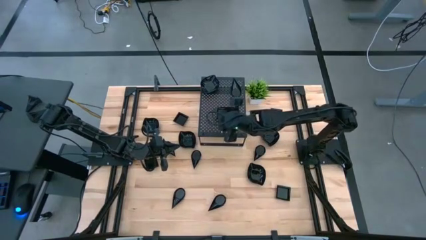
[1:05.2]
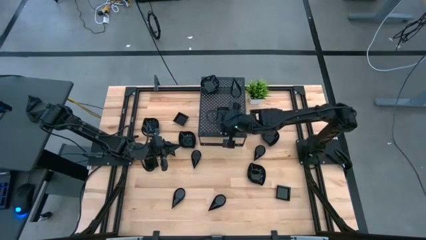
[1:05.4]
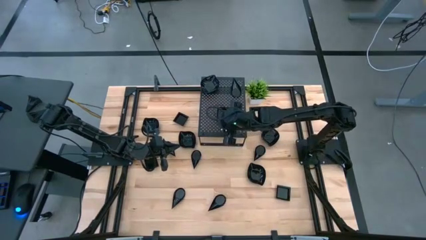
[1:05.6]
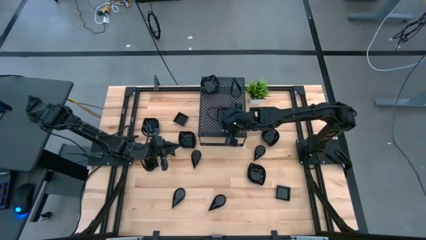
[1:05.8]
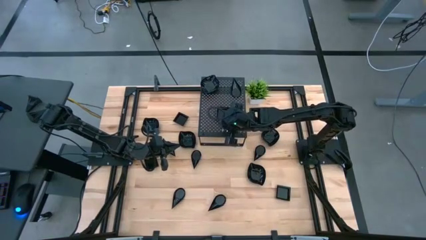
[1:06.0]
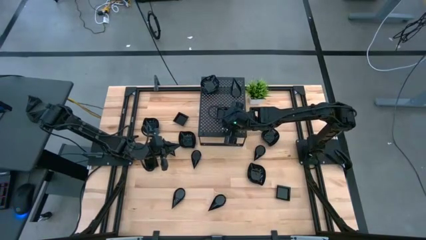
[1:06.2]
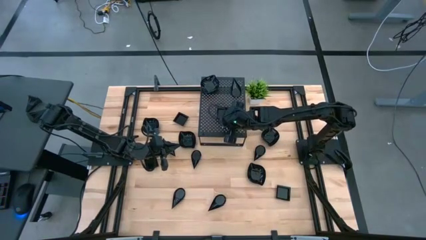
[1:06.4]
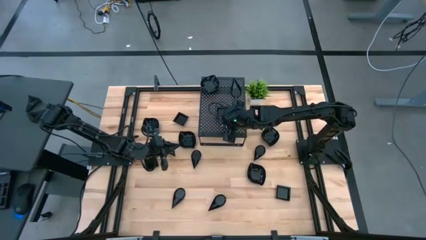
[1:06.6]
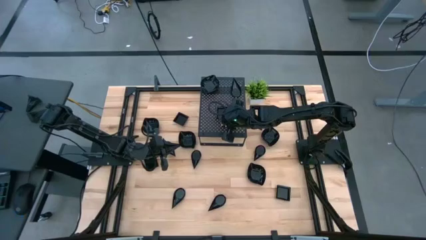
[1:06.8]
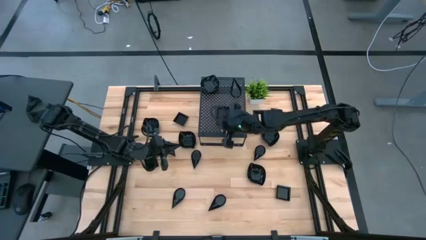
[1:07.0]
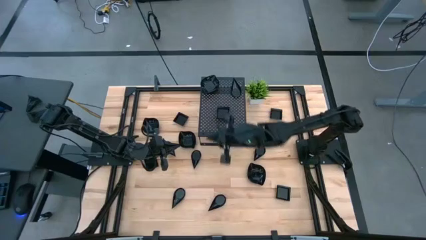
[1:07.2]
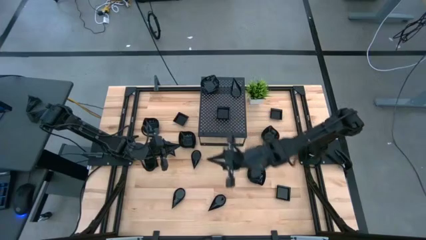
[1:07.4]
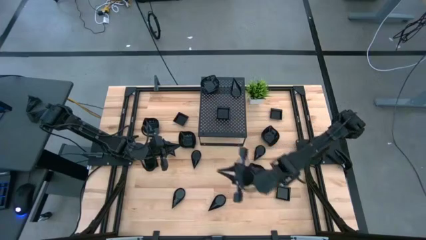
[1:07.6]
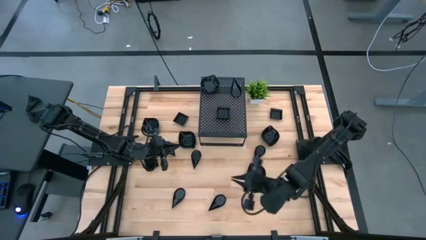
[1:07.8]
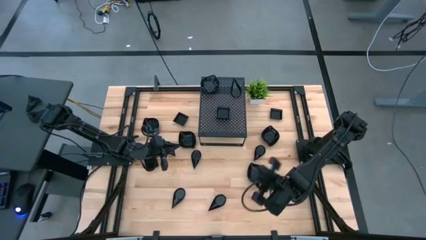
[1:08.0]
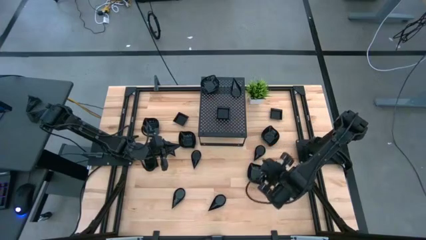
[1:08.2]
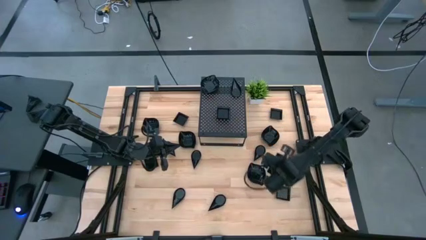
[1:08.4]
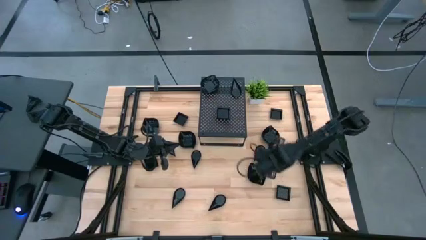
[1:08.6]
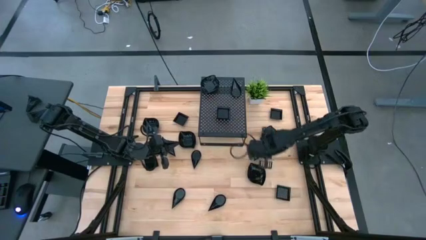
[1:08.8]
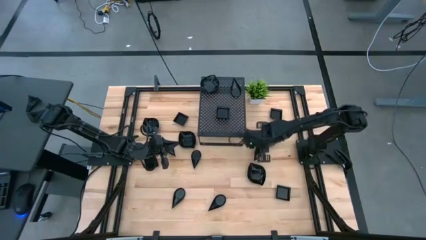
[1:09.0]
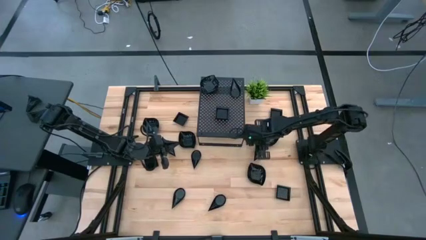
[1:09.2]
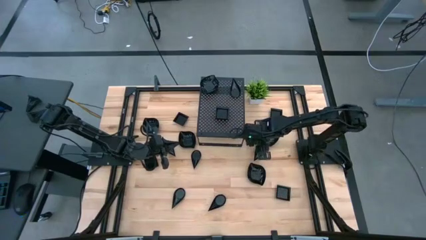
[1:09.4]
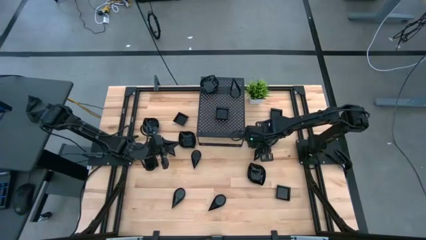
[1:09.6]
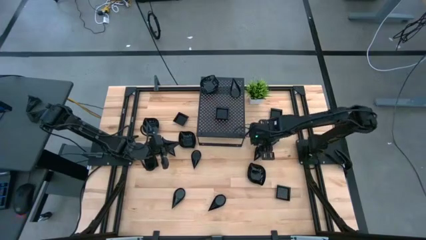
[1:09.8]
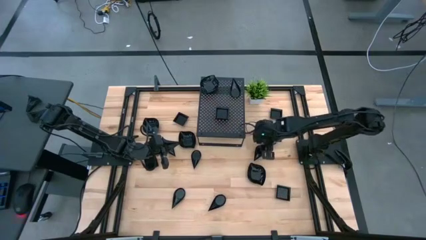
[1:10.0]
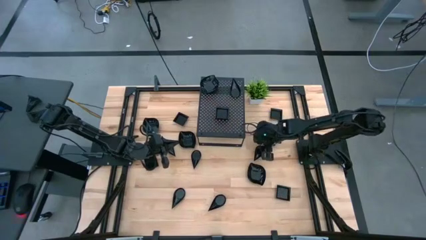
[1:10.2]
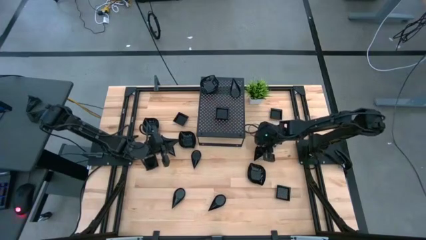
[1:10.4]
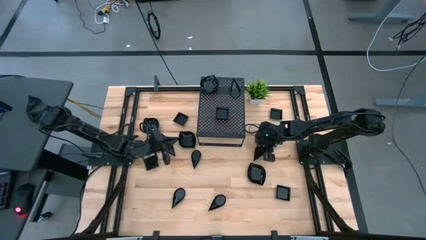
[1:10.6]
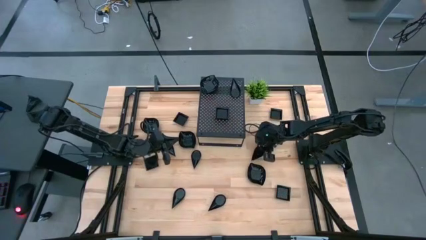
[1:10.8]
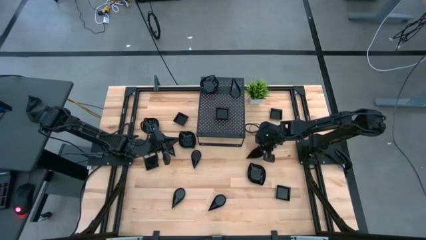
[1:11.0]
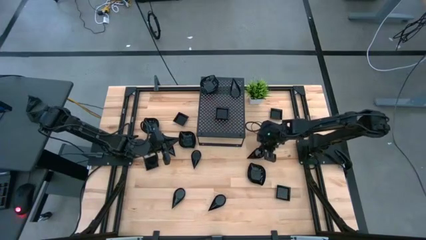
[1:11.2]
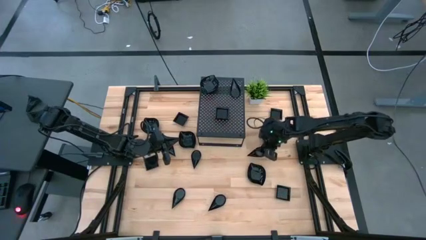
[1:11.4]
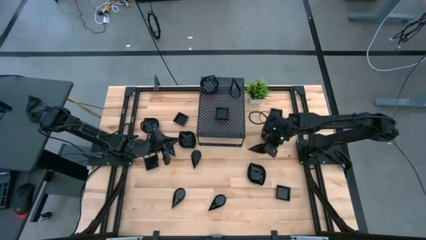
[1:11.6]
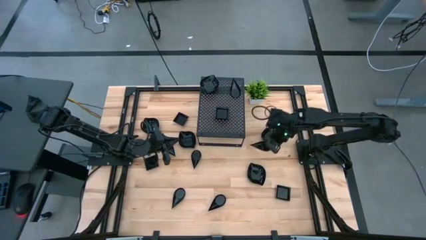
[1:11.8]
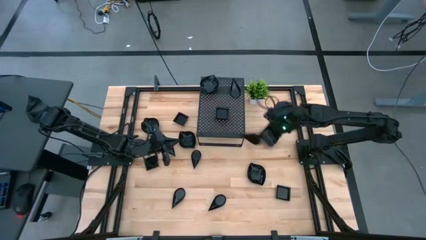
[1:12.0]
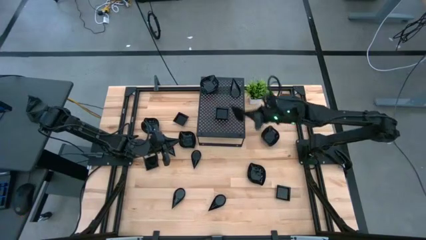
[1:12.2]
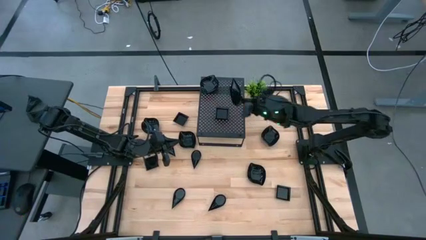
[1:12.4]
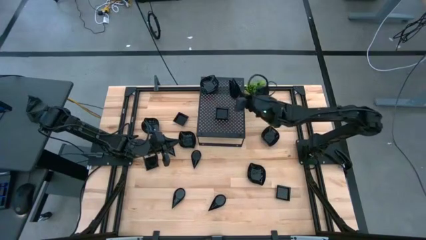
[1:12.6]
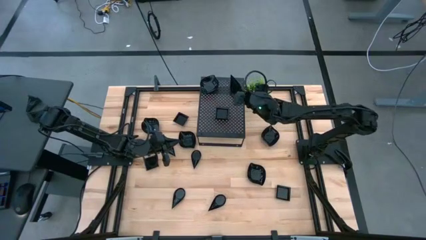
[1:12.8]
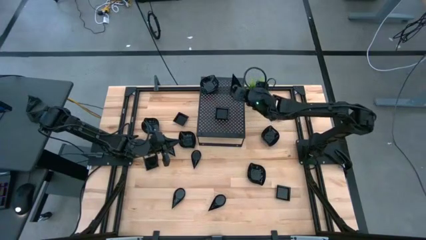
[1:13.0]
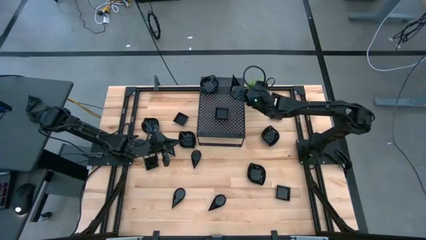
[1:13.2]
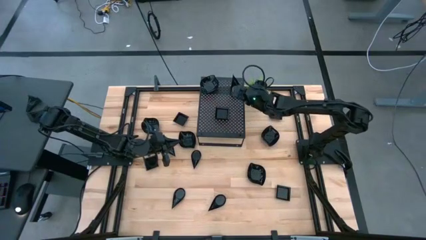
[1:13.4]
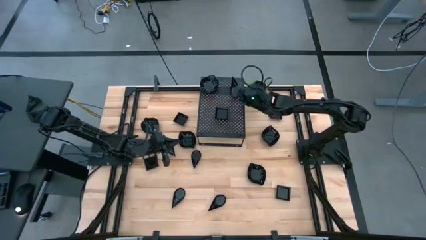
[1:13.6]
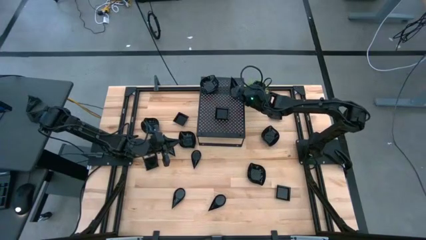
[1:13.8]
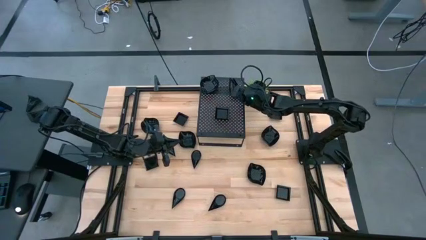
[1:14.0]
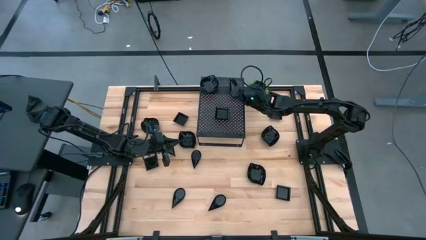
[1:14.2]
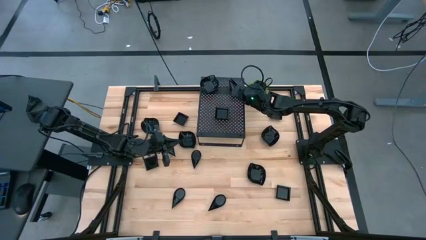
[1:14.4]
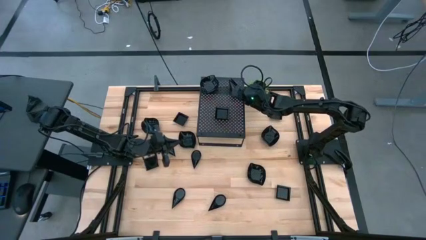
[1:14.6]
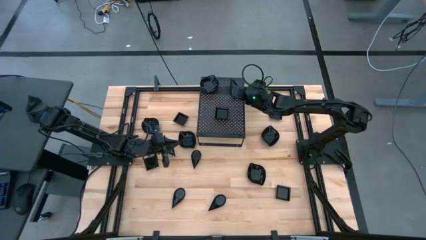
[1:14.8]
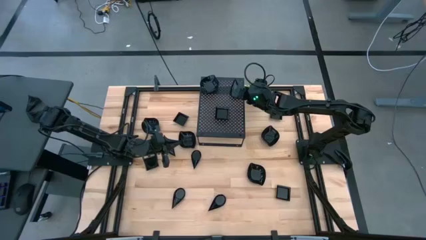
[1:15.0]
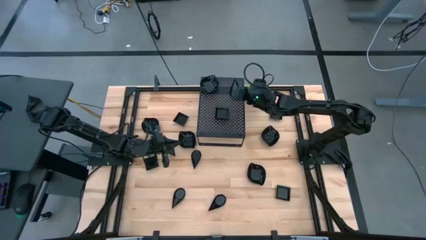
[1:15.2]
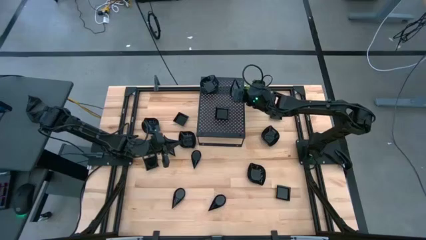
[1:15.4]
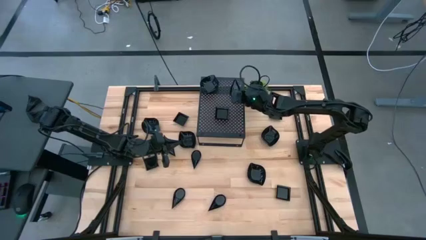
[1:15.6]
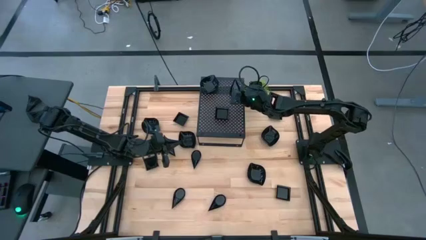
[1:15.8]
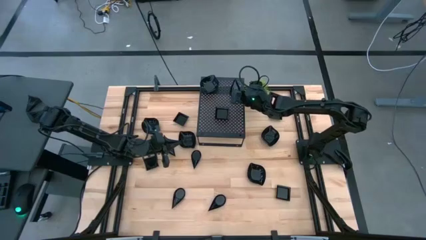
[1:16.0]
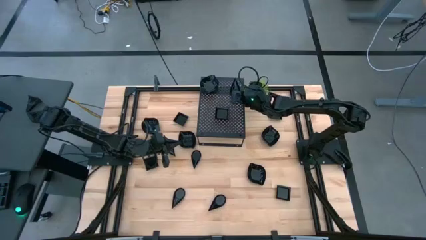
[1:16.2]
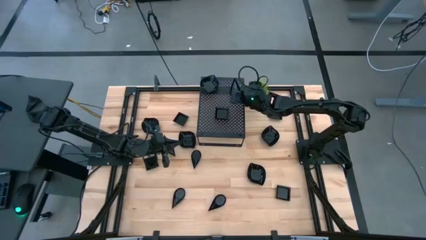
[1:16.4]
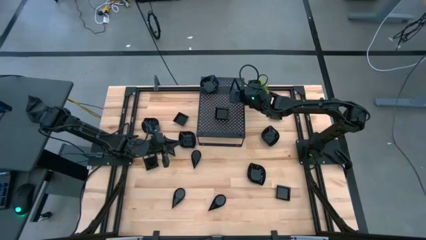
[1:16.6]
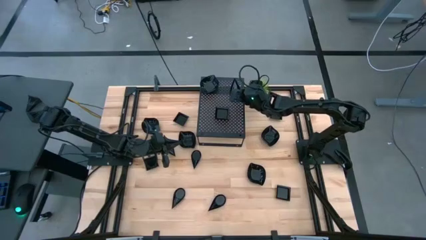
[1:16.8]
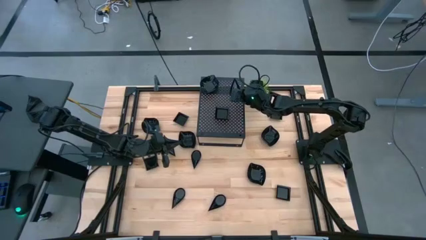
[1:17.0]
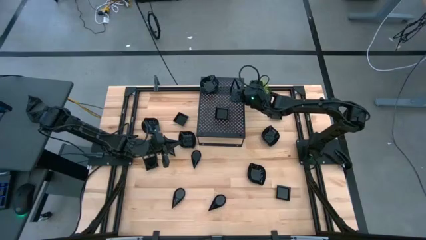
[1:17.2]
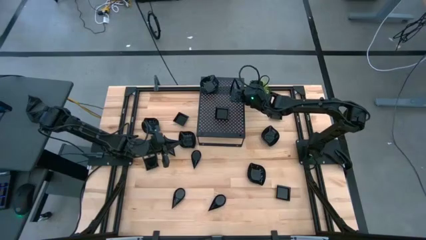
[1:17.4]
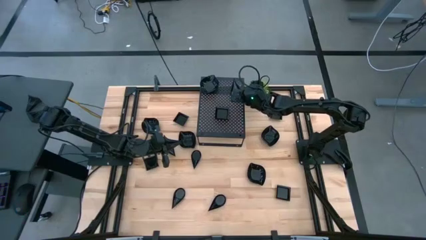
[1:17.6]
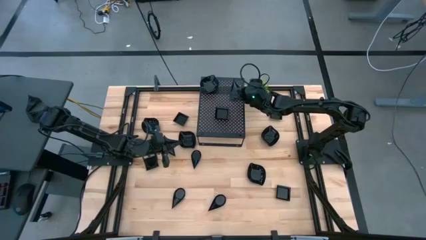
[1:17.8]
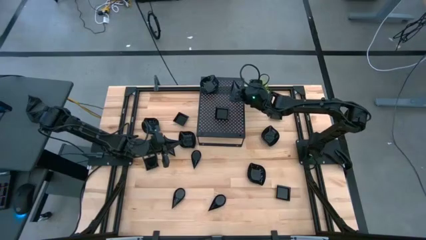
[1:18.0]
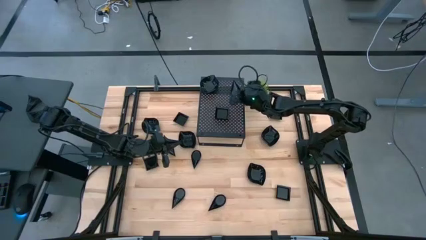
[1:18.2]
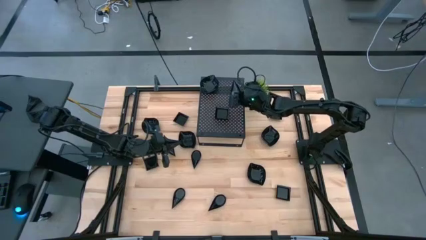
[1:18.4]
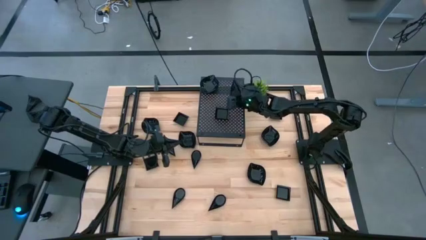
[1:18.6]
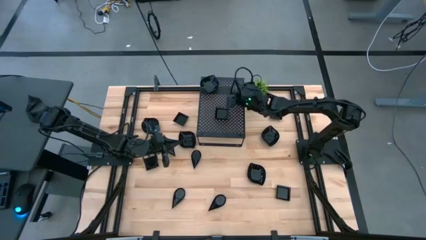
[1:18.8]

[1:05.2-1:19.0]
Task: Pick & Place Mini shaped plates
Stack the black drop-shaped plate on top of the black drop-shaped plates on the shelf
